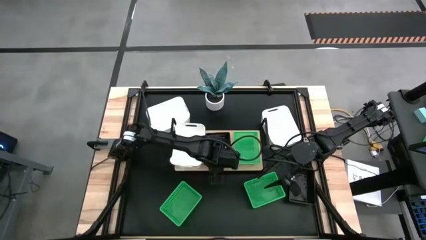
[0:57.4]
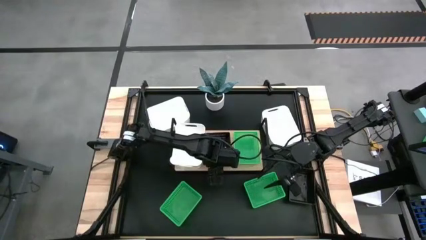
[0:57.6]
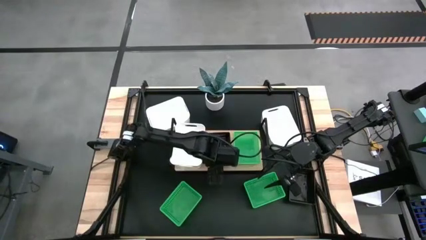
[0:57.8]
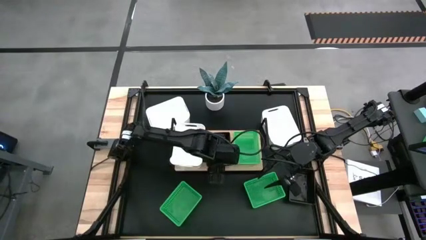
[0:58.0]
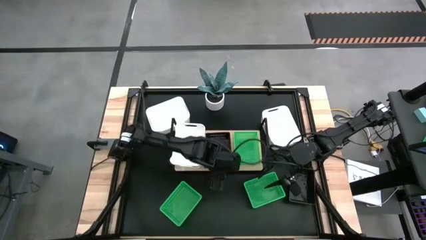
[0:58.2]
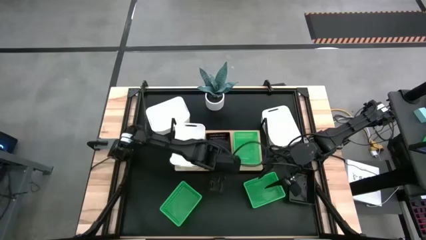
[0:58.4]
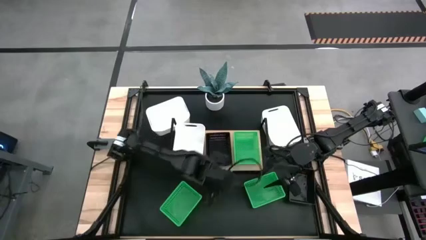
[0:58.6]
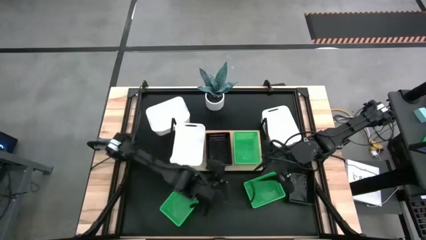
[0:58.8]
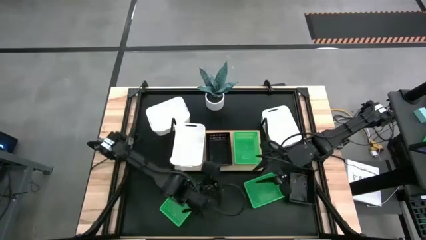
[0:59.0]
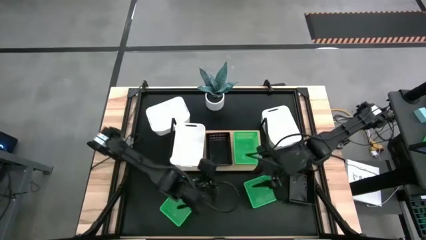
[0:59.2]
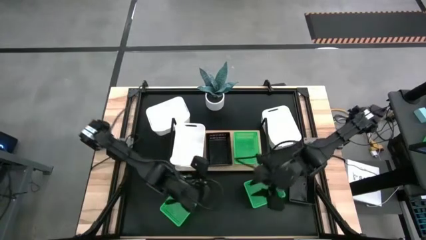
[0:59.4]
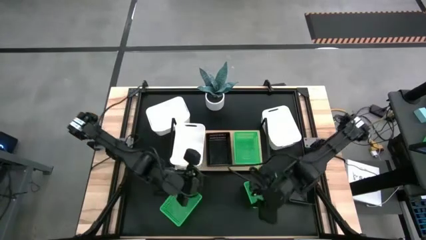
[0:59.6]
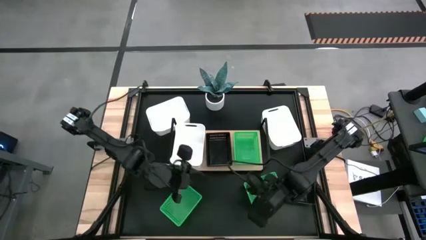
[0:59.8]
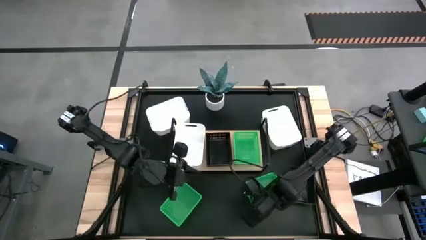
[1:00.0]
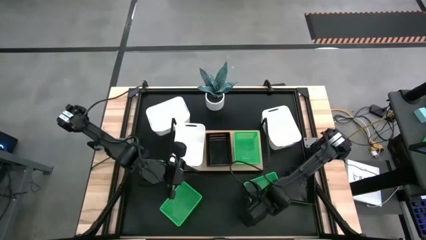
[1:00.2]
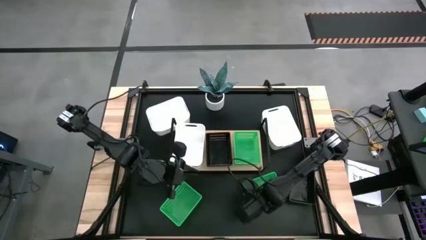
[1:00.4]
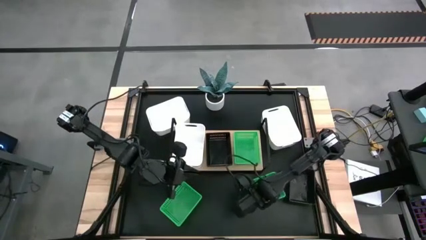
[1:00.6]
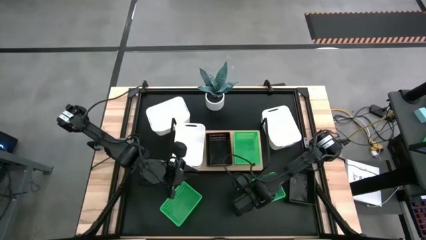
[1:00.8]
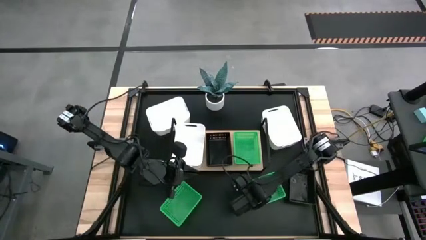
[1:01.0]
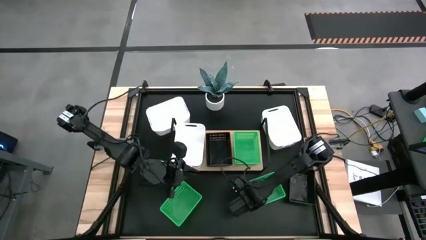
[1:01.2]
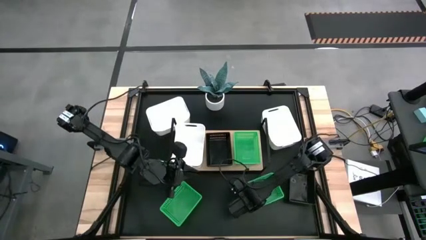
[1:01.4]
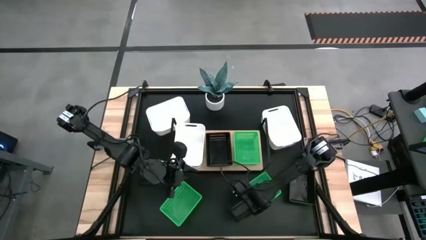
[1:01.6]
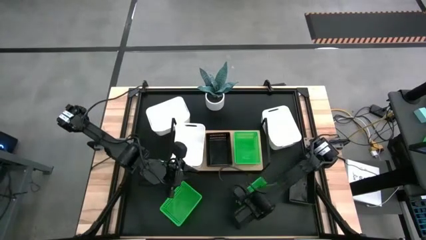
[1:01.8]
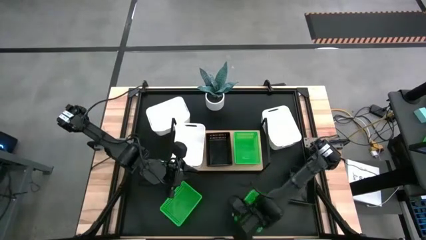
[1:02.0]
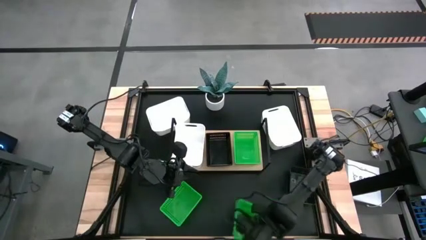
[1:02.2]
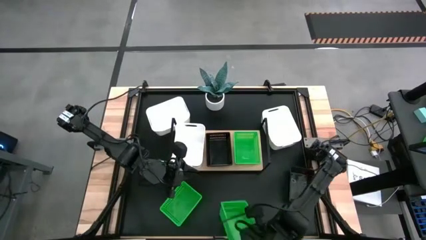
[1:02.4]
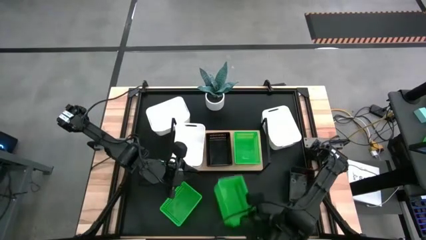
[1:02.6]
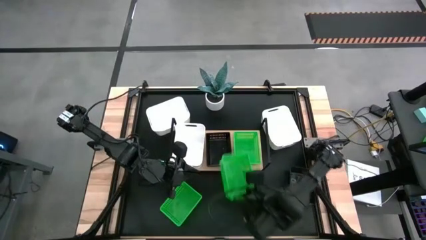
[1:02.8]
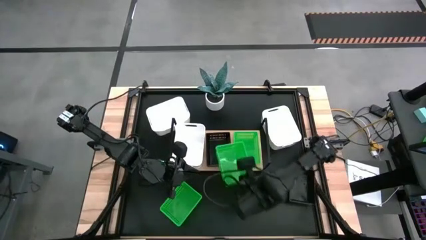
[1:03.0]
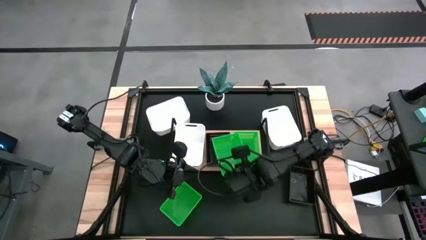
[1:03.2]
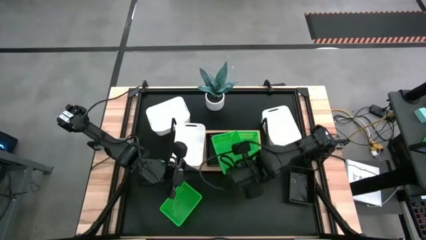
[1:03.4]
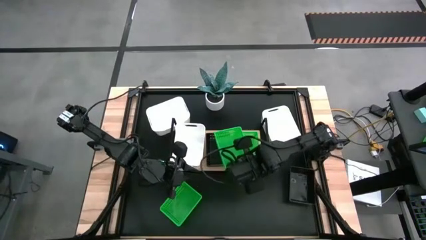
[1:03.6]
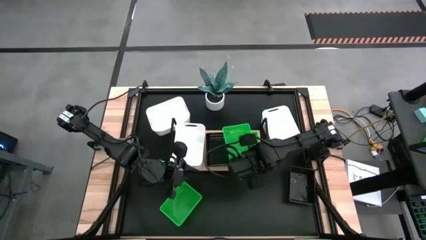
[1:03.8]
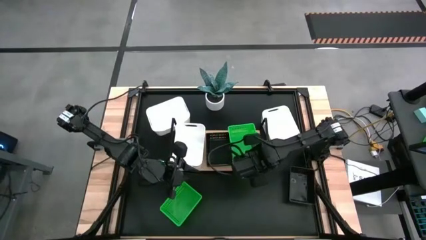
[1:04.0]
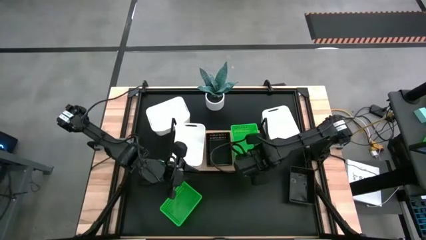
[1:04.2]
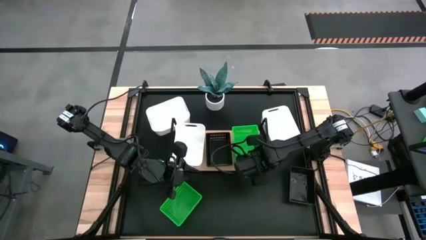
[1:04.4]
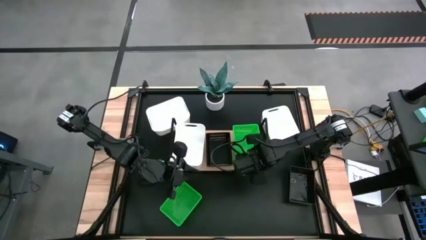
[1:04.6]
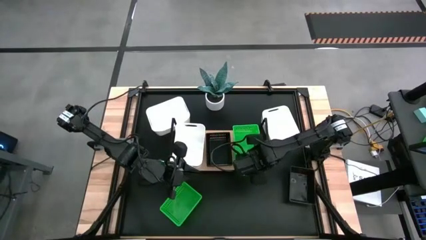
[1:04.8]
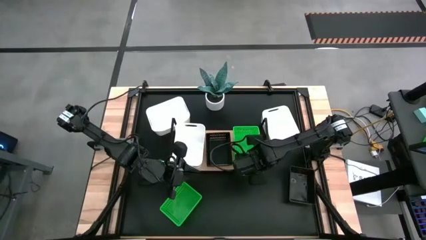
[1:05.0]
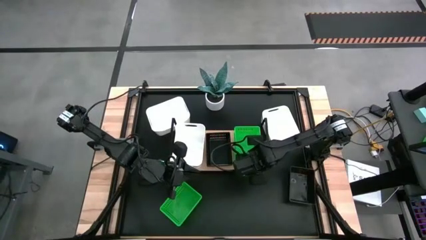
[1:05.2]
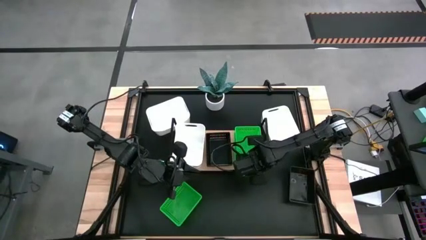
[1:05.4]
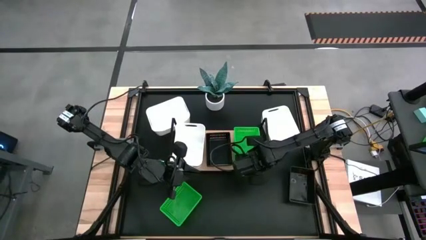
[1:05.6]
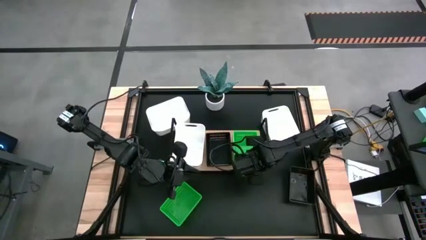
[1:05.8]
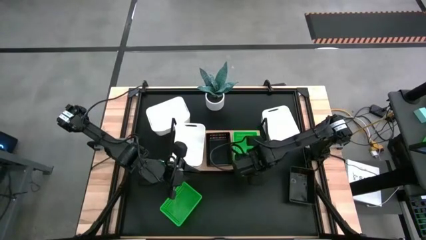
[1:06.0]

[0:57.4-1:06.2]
Task: Stack baskets on shelf by color
Stack the right green bin on top of the other green bin on the shelf

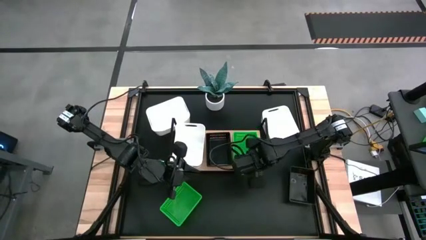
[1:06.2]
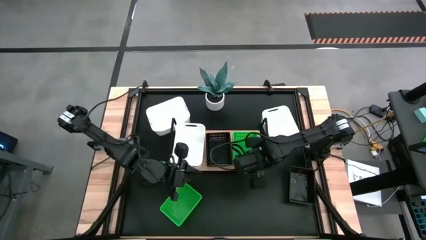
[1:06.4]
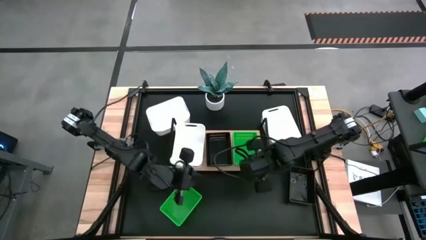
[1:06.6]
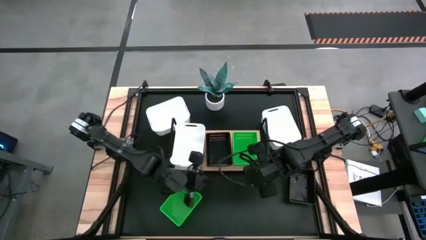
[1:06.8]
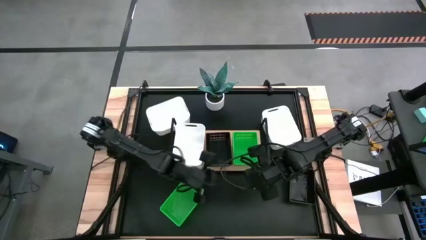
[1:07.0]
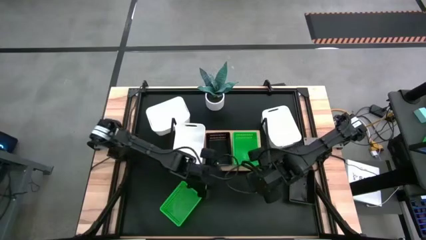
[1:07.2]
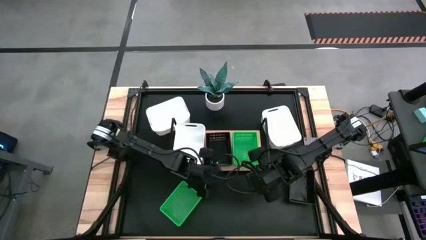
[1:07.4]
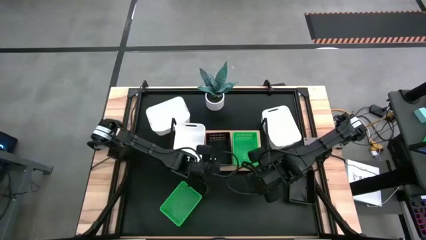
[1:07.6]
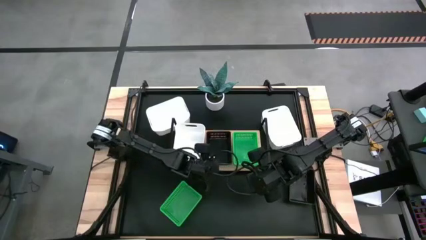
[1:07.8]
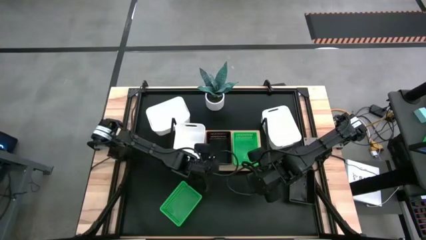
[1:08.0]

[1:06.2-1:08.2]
Adjust the black bins on the shelf

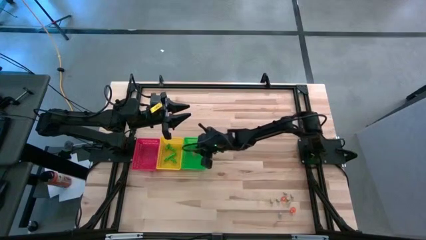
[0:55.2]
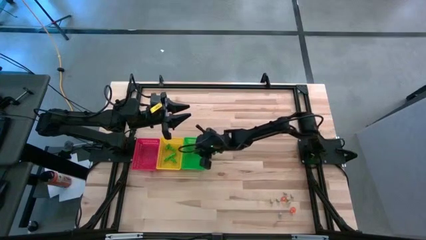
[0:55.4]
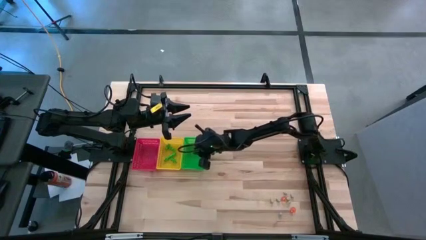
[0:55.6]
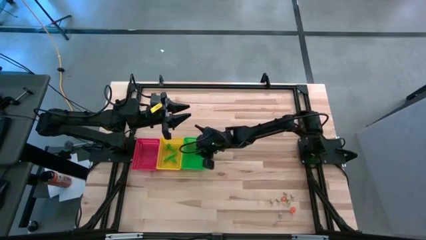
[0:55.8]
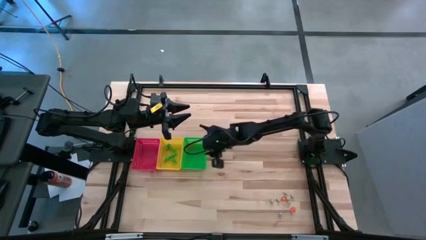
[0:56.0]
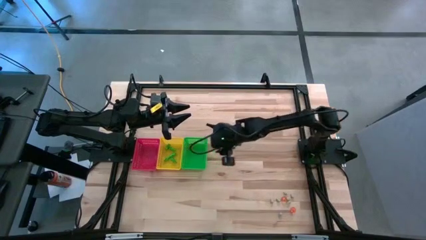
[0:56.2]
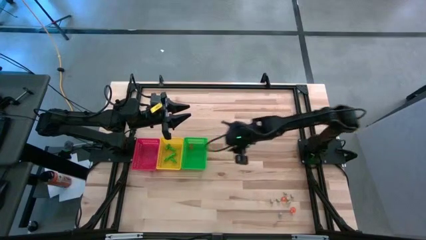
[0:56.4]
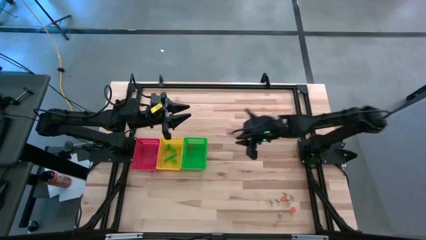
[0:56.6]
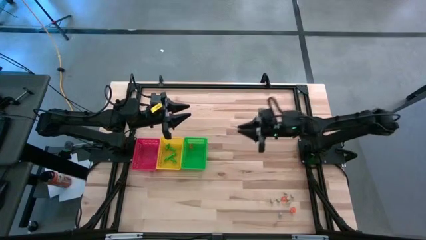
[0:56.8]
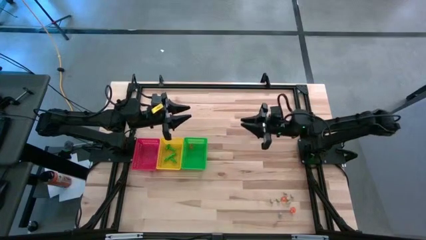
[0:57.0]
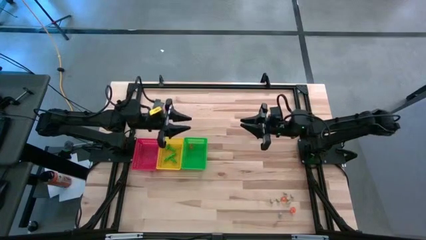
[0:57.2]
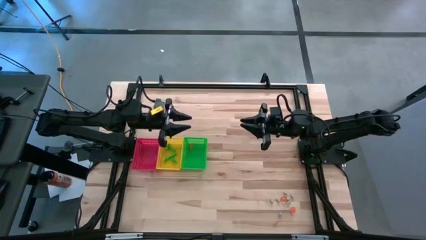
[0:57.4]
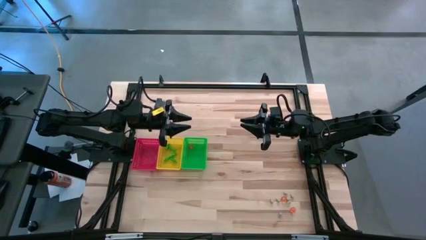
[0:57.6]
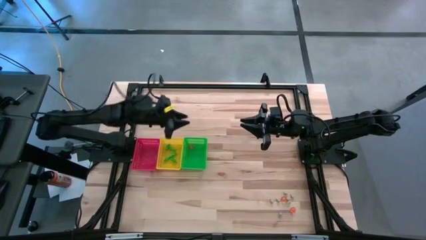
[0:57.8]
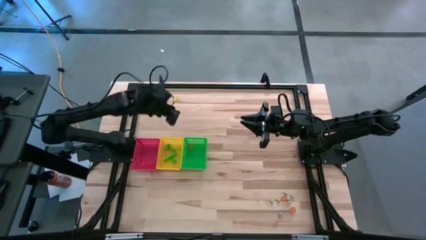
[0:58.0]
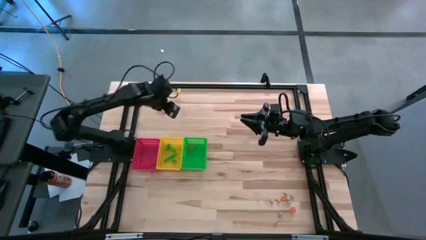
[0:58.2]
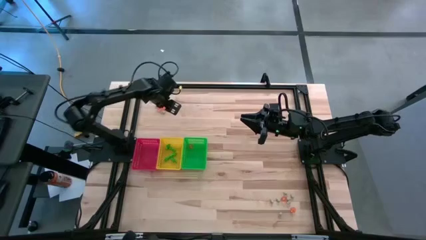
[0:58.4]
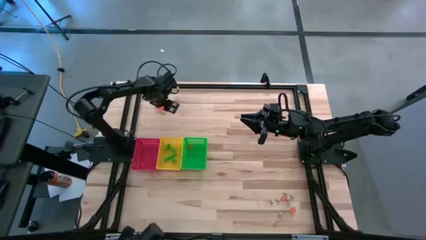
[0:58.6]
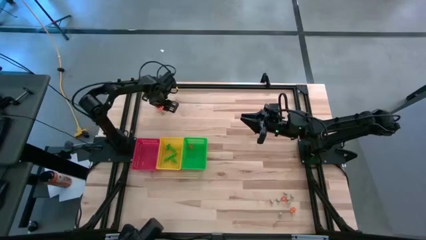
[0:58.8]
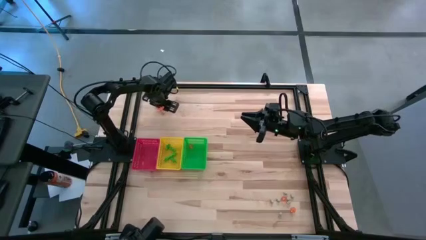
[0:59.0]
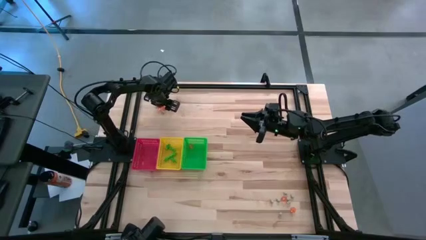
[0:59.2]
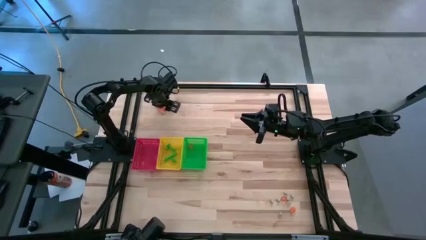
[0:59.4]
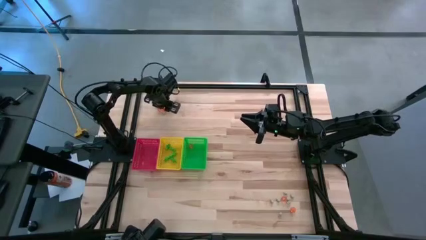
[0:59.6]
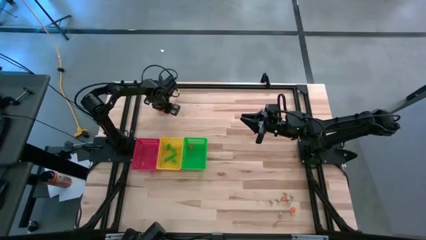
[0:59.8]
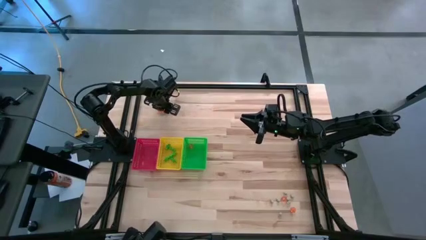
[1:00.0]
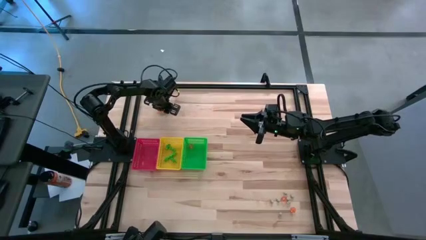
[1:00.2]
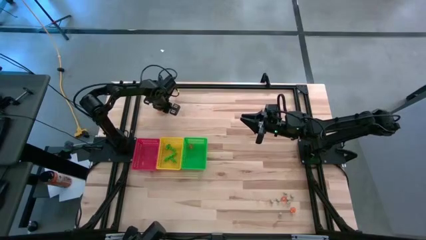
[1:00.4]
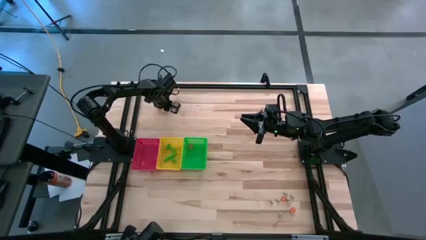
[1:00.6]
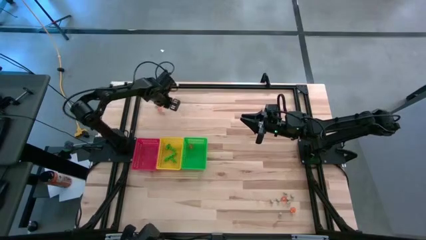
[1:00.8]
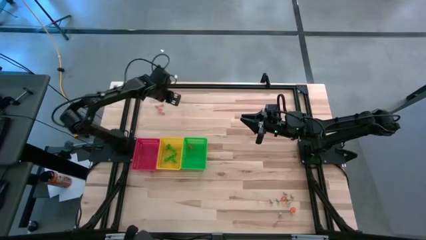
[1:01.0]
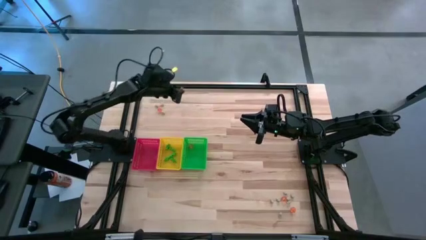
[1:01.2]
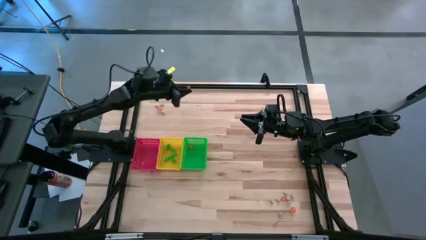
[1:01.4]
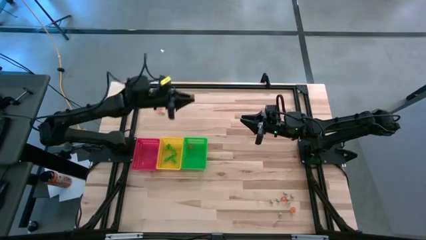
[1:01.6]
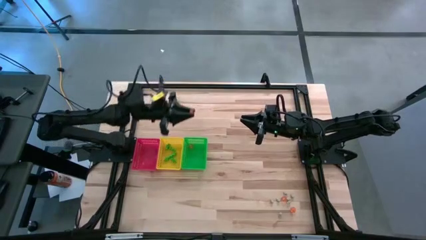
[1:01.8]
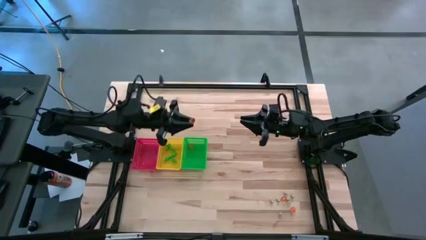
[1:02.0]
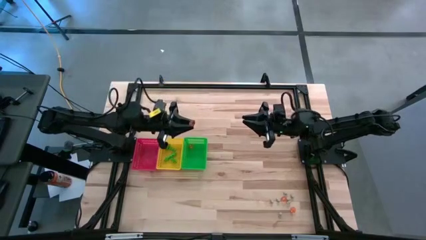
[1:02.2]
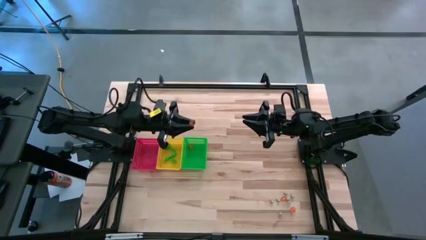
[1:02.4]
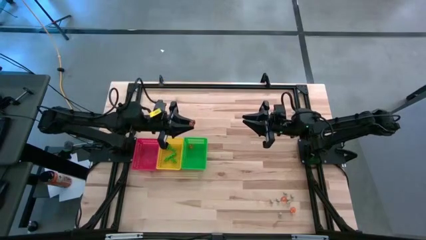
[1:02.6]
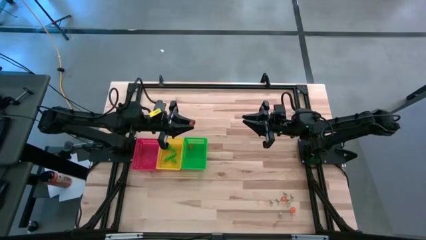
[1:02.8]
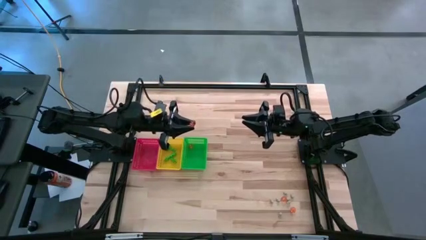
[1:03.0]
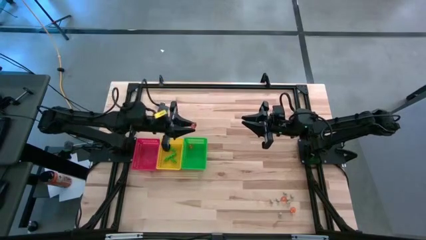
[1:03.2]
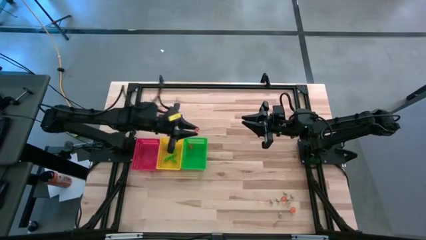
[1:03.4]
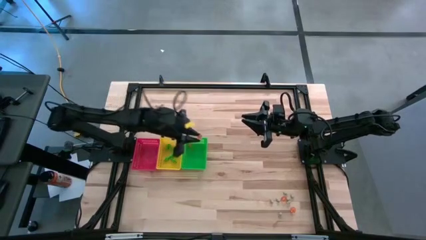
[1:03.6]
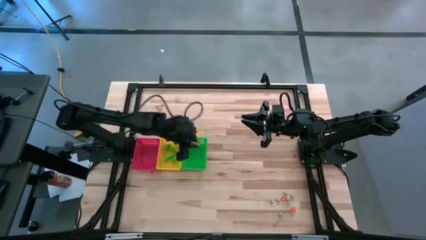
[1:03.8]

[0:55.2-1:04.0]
Task: Sort Halloween decoration
Put the orange pumpkin toy into the green bin
